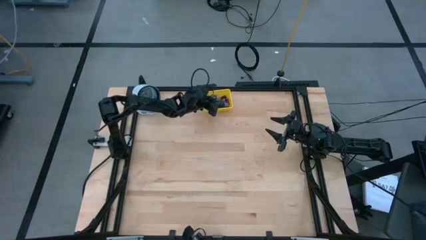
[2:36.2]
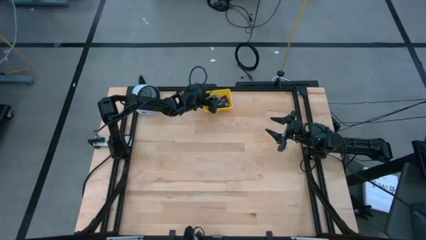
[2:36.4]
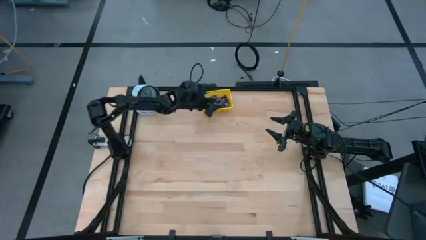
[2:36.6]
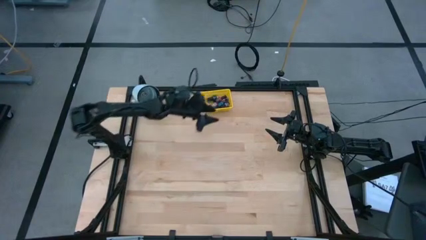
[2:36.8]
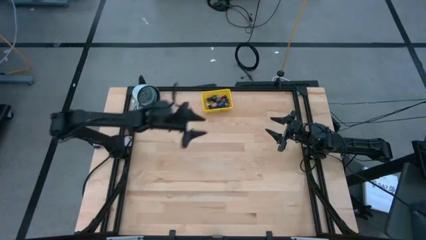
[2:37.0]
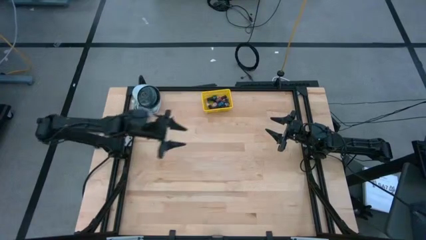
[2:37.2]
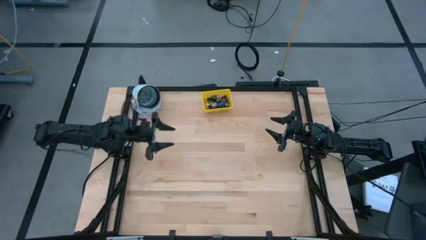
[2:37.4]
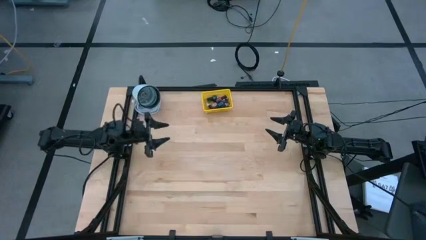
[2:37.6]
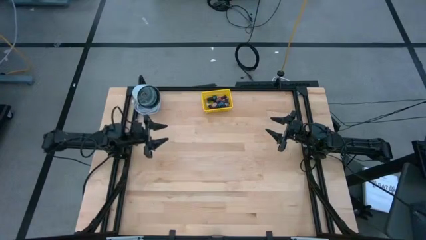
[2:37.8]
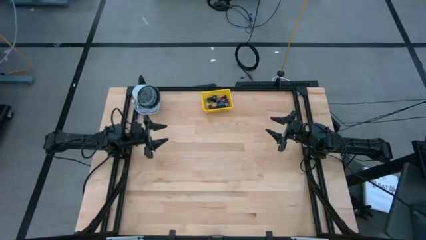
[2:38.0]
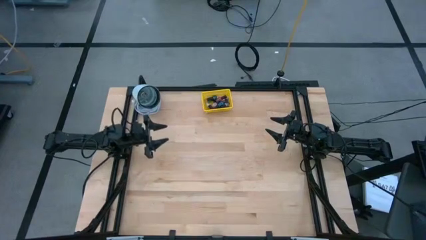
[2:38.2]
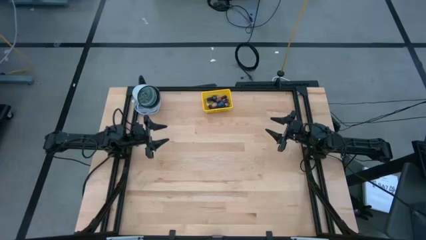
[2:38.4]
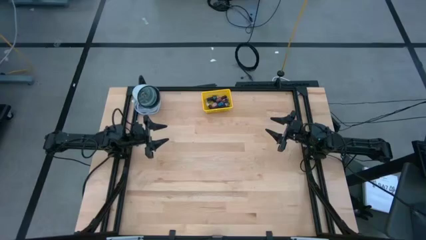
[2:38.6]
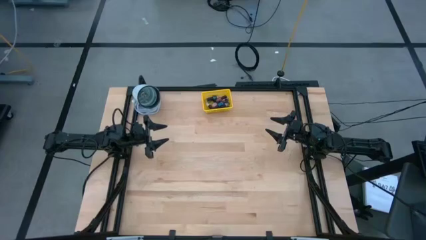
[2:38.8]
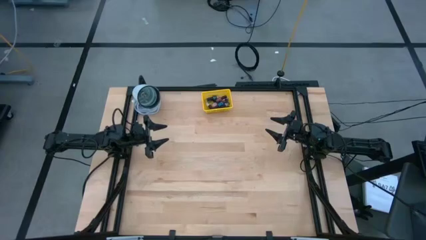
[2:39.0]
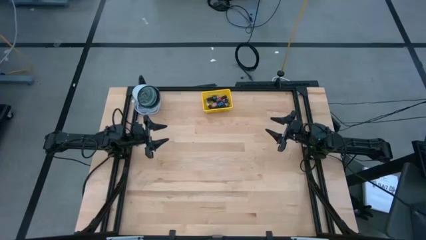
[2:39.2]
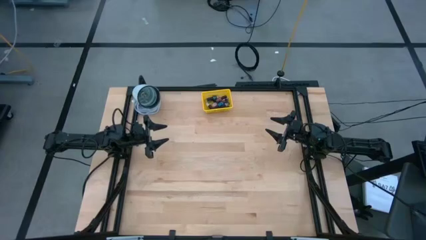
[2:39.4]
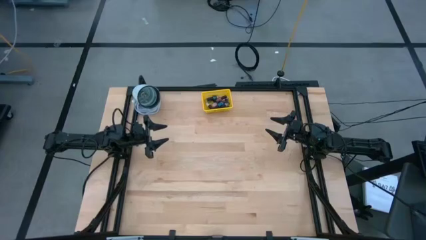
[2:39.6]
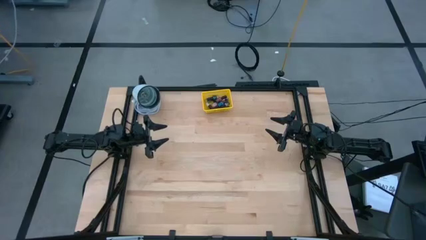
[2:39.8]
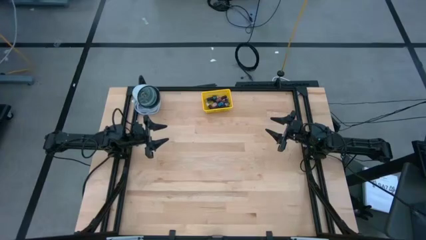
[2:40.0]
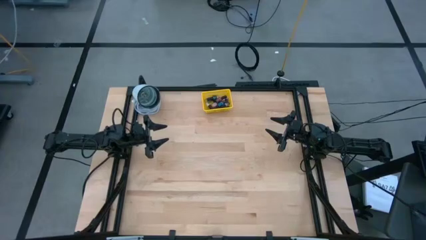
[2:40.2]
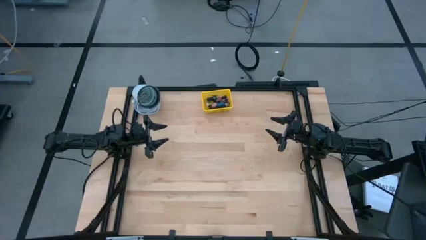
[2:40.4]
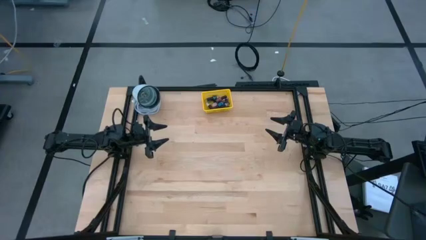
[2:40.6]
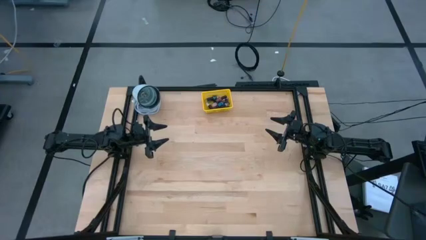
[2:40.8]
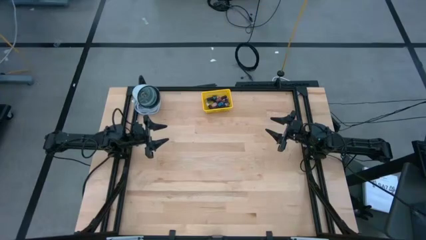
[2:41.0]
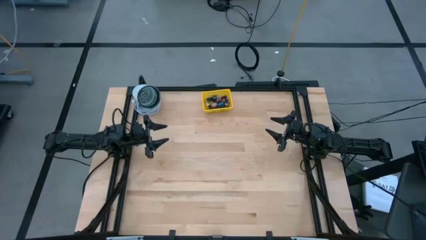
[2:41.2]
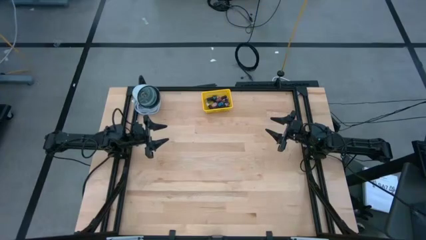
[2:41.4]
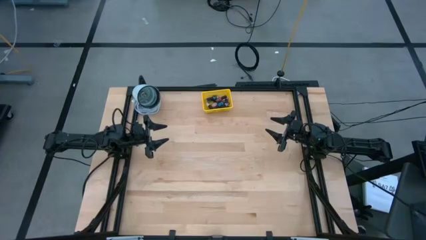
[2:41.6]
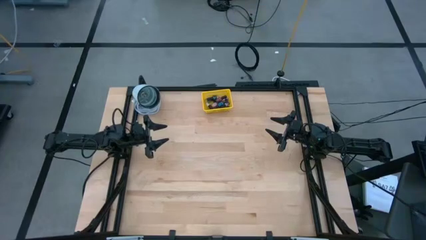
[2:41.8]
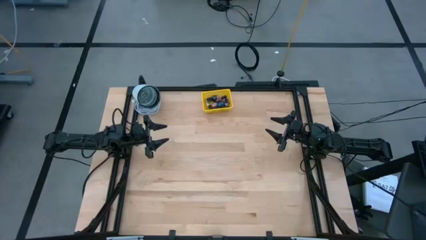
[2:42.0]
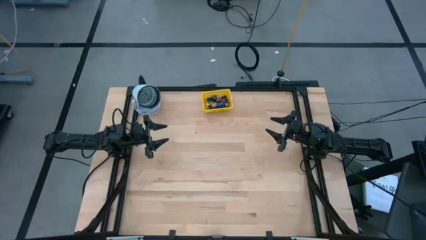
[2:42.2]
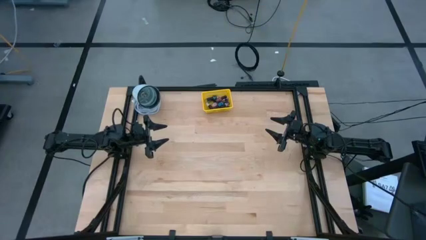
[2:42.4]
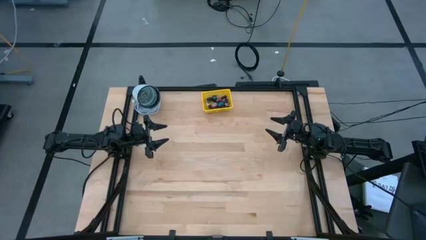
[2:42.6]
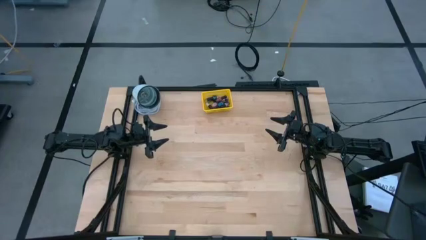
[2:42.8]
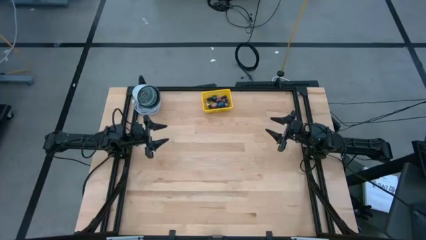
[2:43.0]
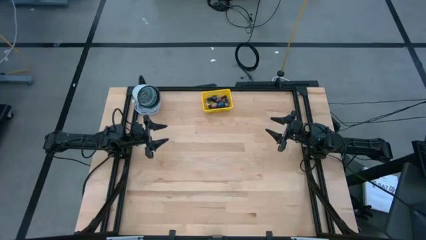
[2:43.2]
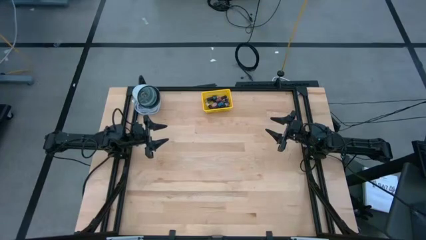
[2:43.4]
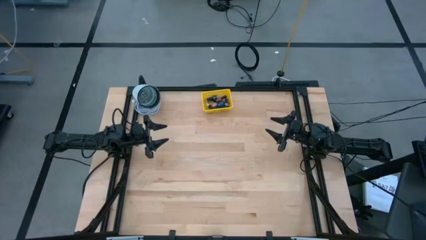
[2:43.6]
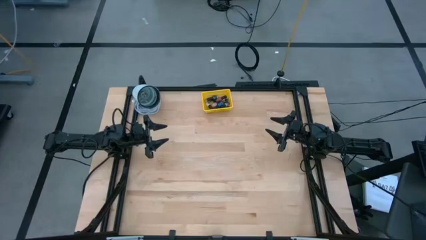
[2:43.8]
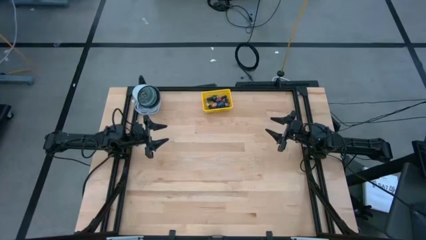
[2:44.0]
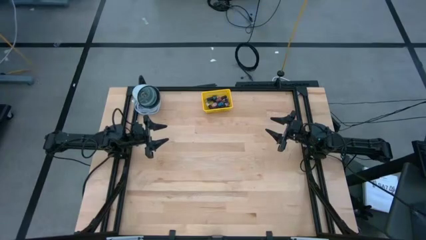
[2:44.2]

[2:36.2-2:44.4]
Task: Pick & Place Nail Polish
Return to Home Position

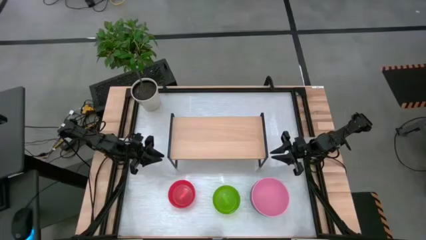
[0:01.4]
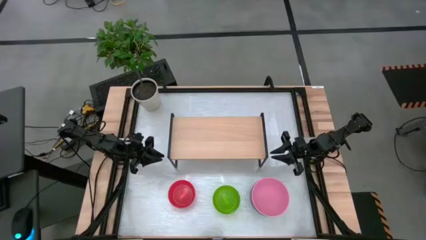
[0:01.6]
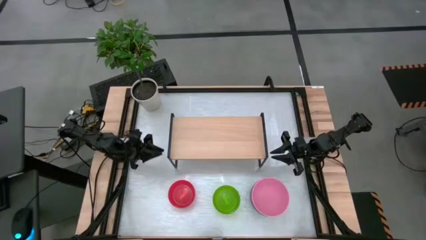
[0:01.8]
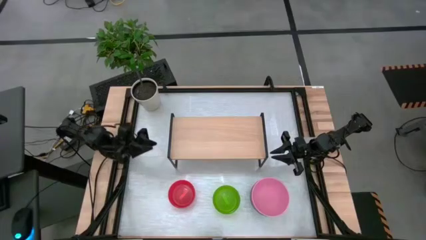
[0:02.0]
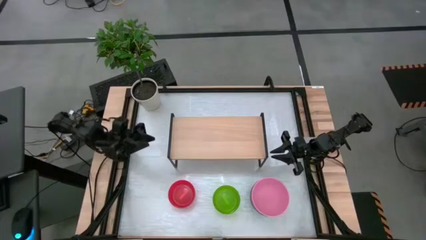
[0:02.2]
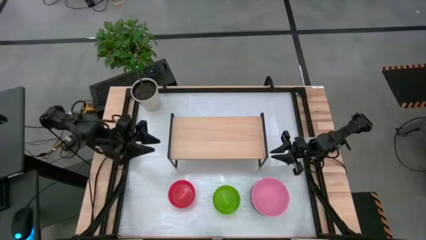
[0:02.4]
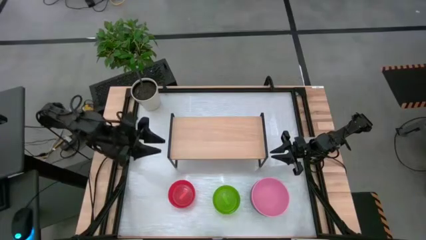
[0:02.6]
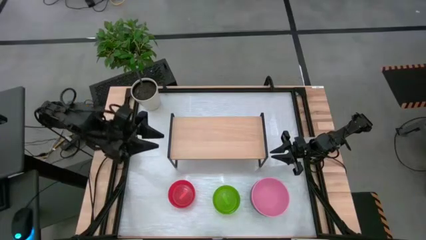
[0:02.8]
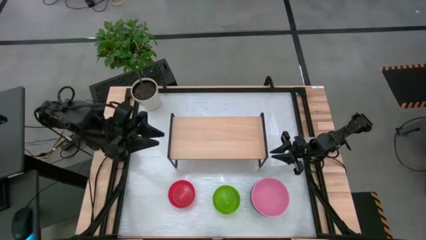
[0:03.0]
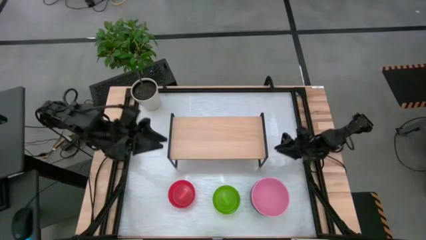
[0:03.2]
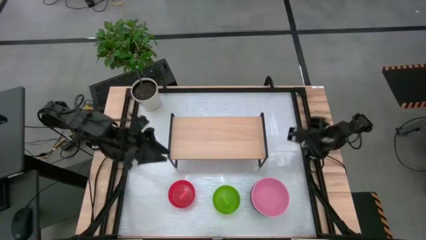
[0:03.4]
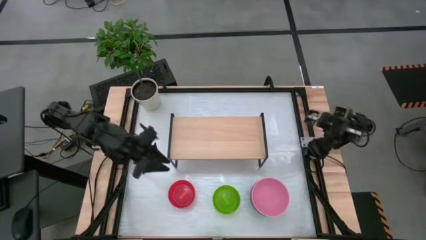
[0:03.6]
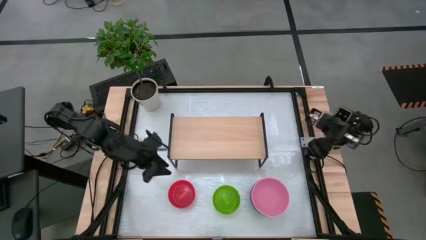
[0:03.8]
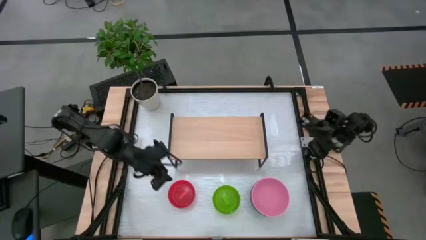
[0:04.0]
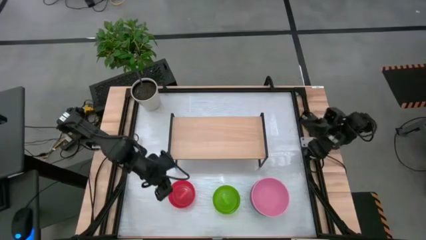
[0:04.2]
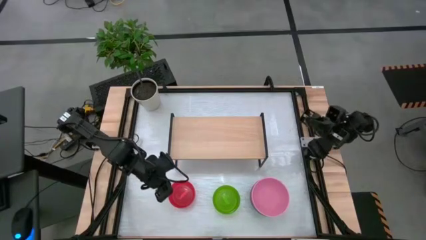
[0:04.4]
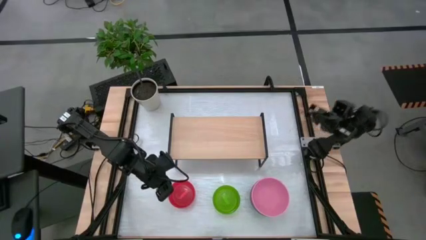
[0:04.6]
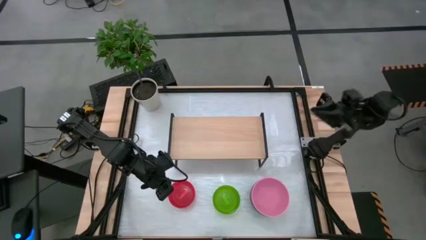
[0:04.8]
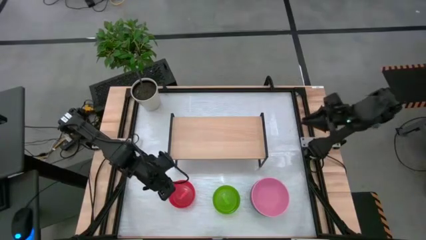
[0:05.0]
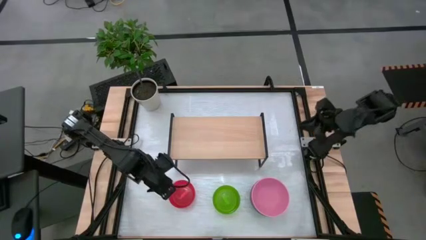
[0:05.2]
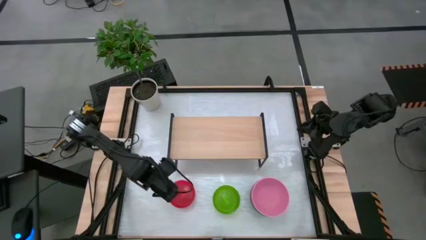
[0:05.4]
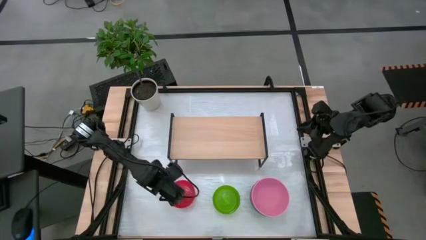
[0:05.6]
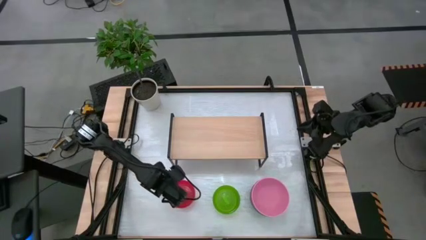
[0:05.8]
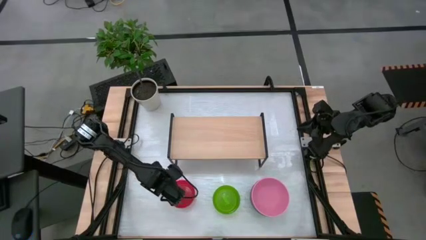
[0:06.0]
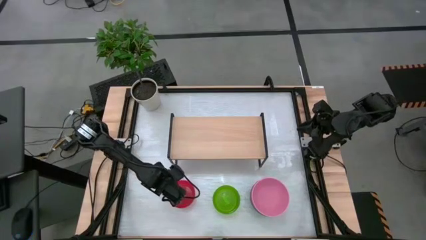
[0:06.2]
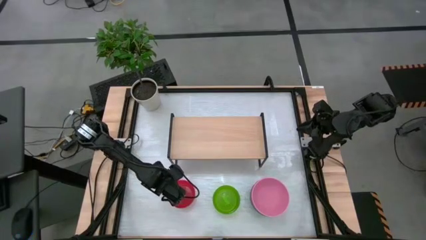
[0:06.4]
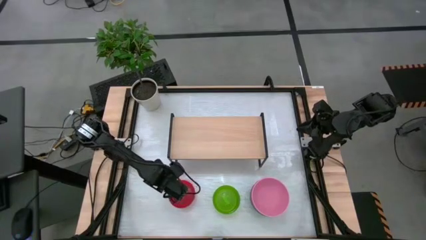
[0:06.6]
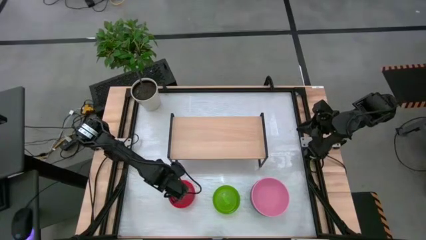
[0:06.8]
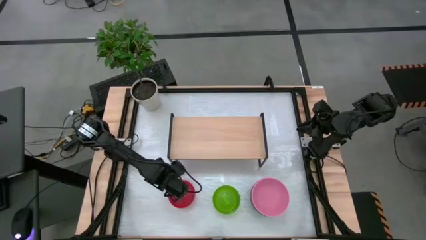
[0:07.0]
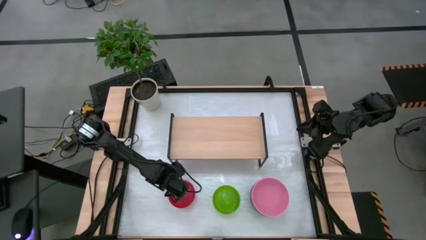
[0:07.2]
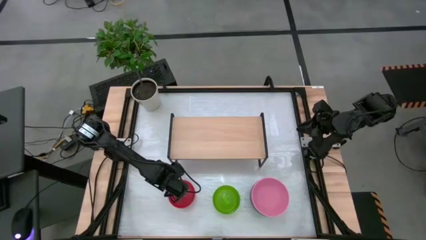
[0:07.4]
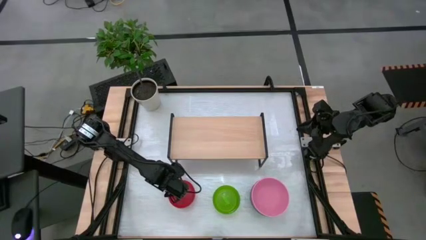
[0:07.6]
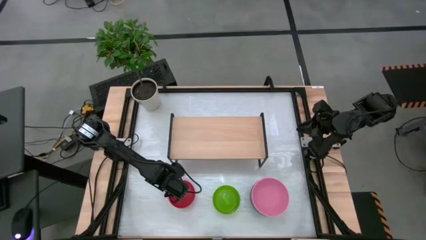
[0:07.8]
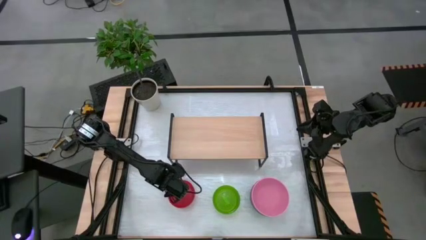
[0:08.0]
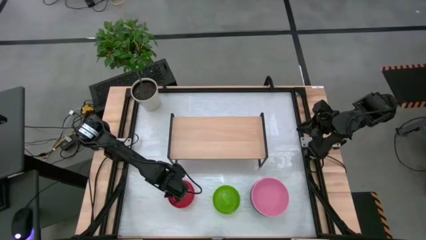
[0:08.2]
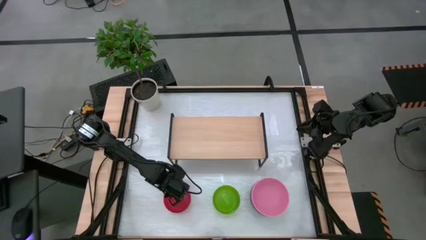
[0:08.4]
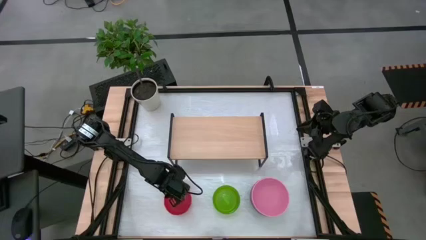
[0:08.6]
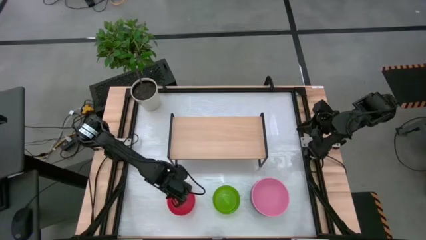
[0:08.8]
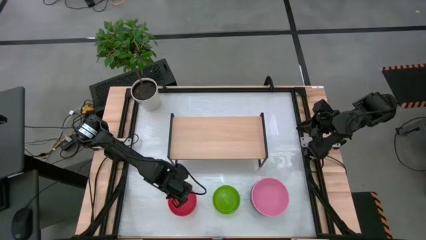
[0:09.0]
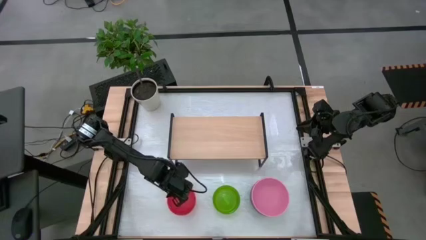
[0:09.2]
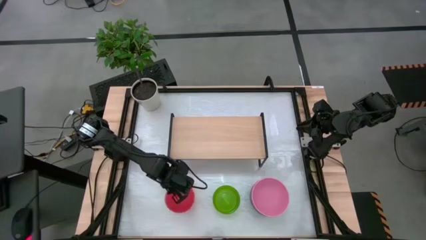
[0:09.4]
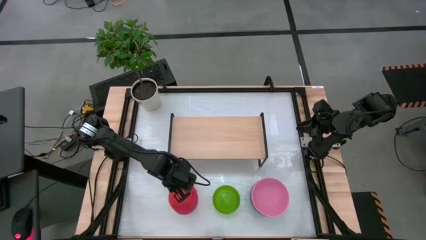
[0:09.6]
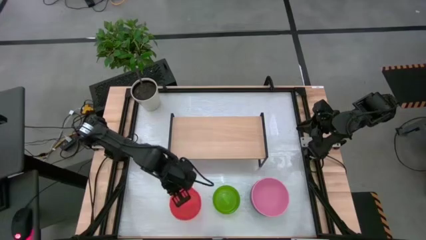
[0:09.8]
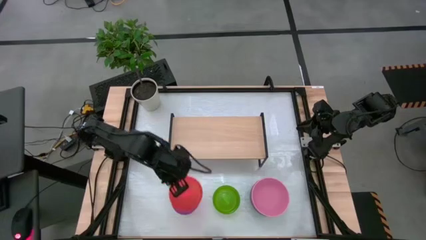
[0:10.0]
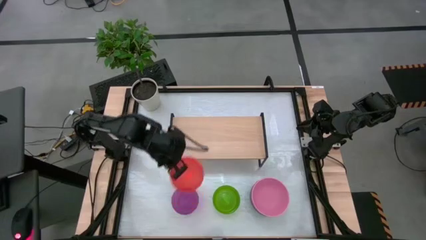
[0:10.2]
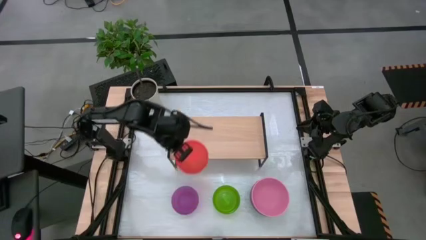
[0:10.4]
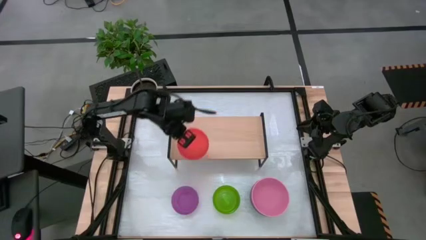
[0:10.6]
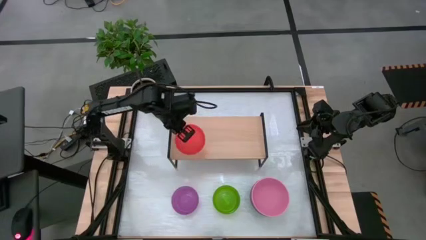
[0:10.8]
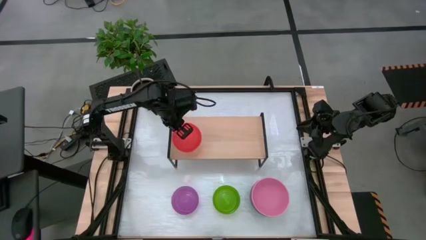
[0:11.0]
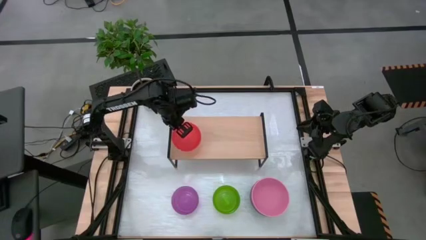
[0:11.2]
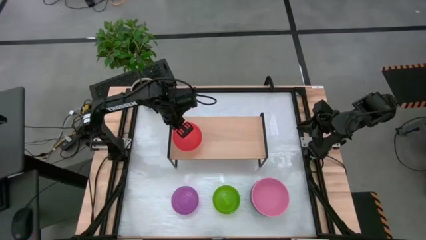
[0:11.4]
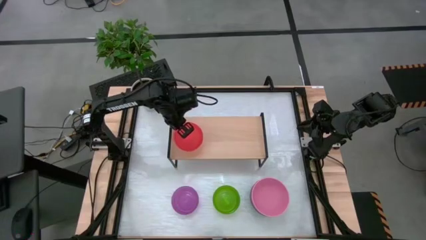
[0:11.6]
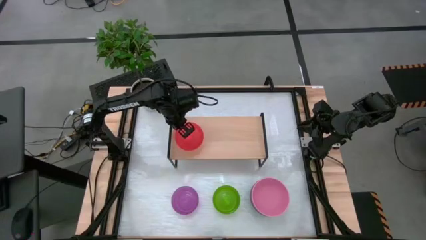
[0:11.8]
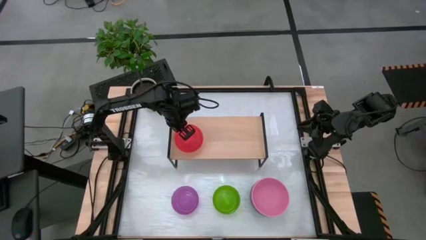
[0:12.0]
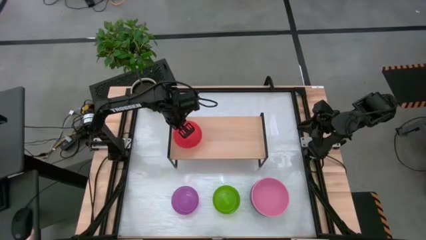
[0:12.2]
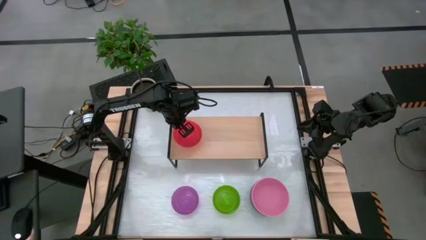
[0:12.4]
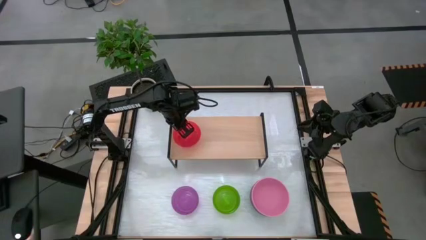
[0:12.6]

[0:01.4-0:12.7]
Task: Place and stack bowls onto a shelf
Put the small orange bowl on the shelf
